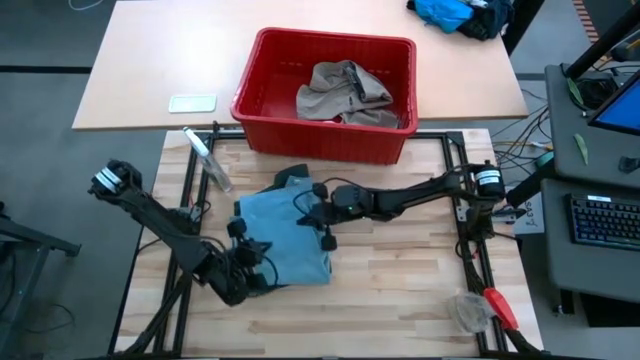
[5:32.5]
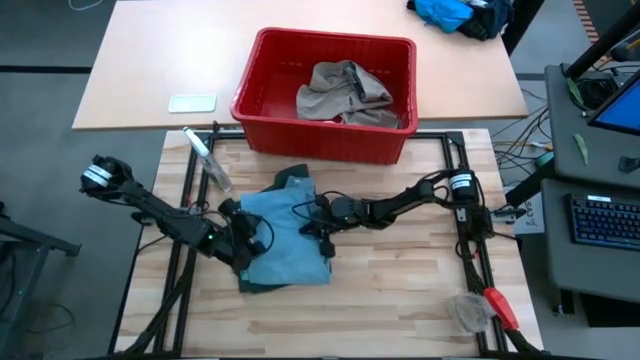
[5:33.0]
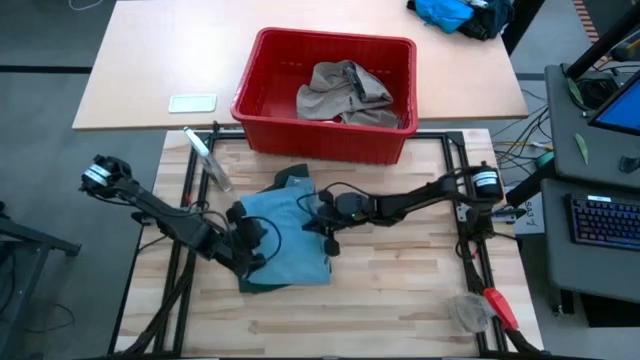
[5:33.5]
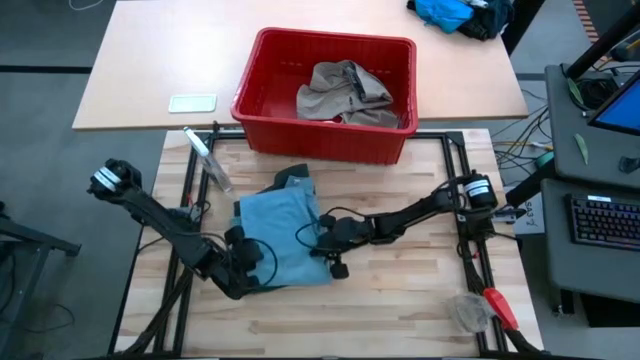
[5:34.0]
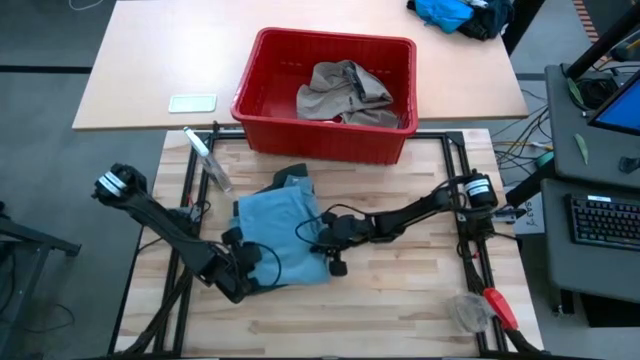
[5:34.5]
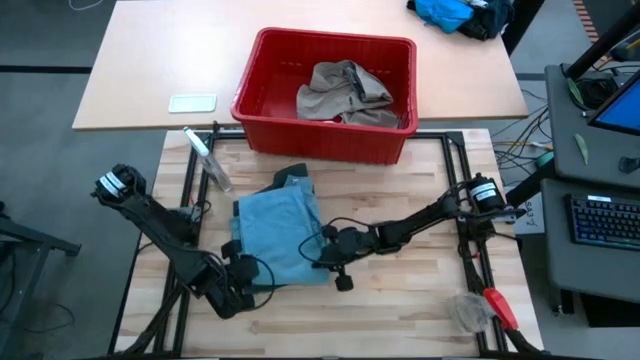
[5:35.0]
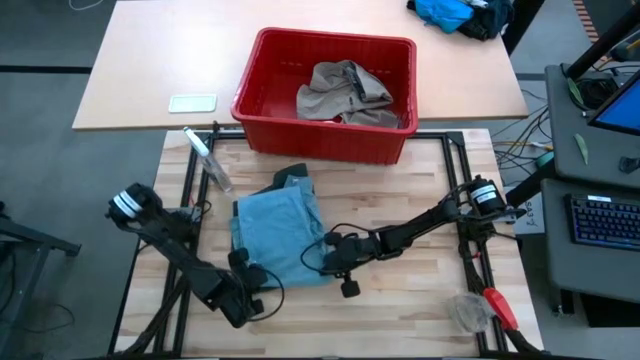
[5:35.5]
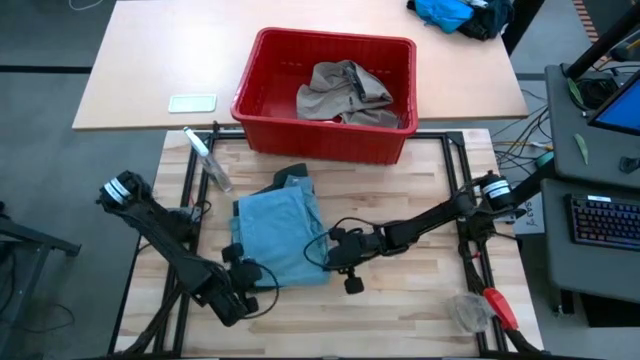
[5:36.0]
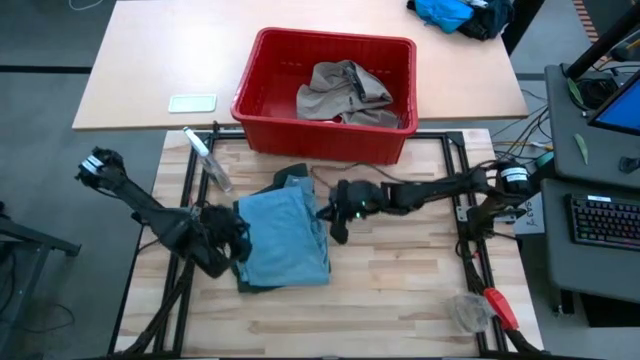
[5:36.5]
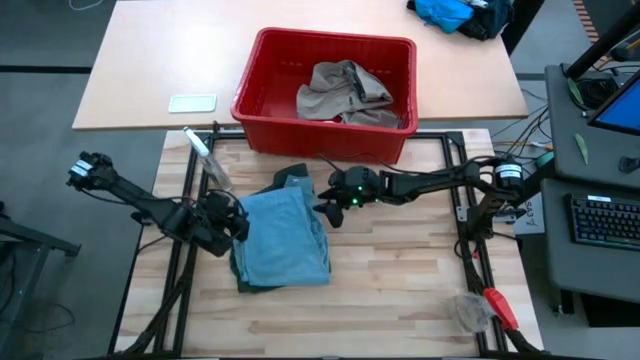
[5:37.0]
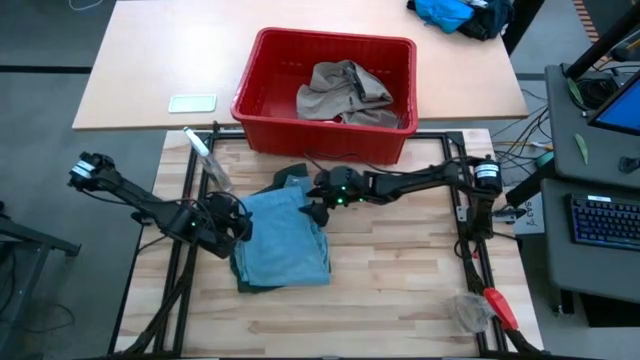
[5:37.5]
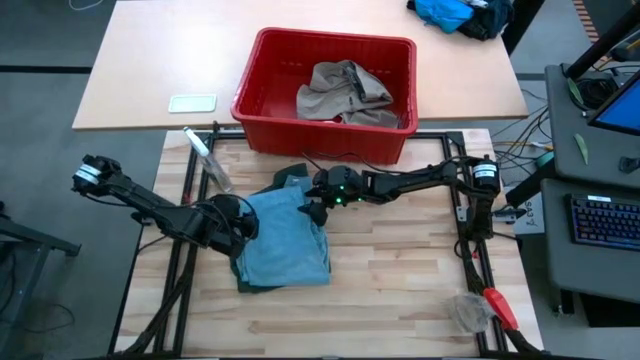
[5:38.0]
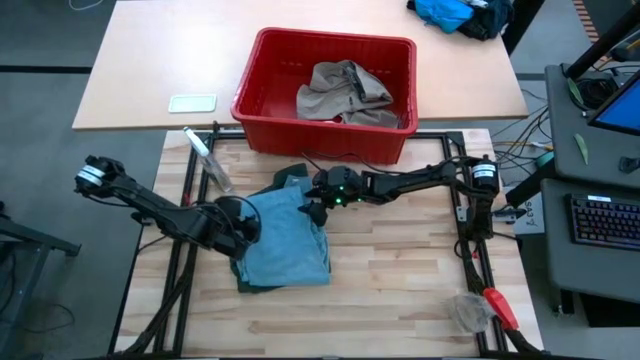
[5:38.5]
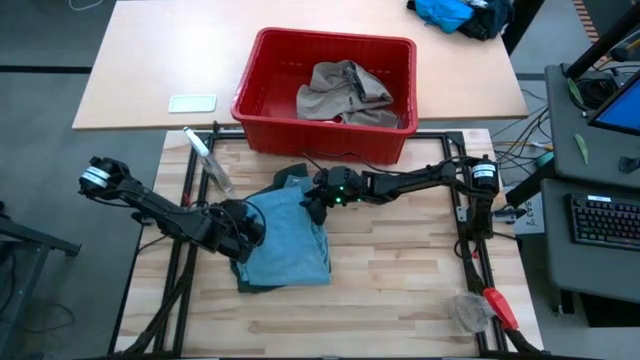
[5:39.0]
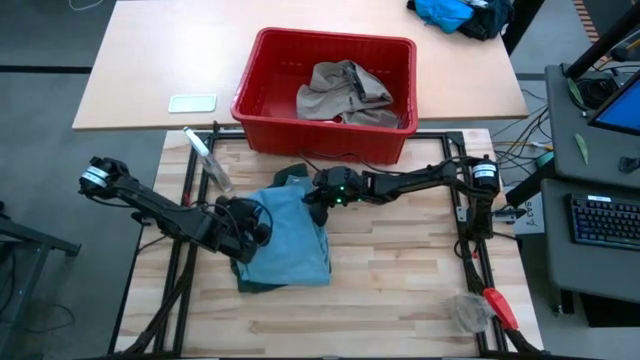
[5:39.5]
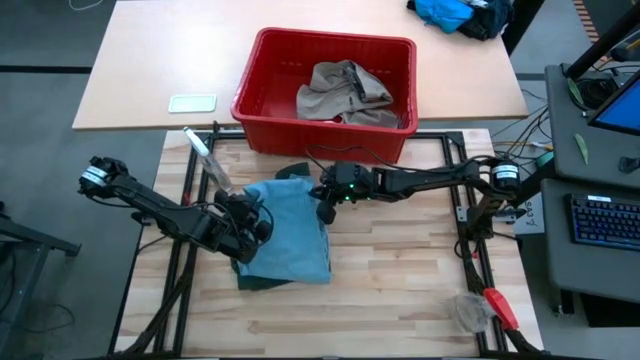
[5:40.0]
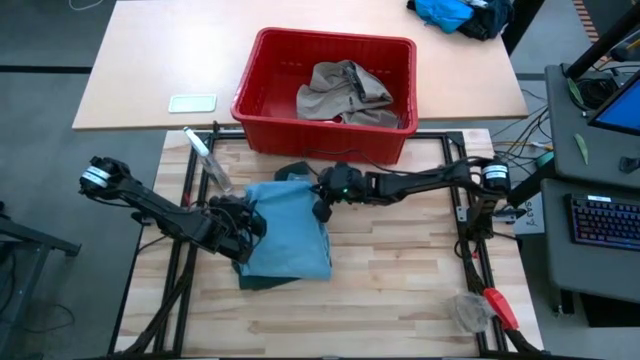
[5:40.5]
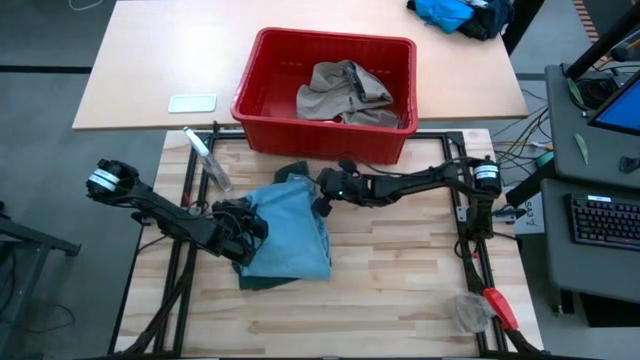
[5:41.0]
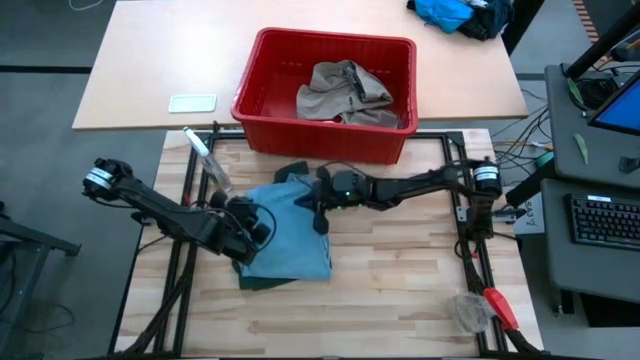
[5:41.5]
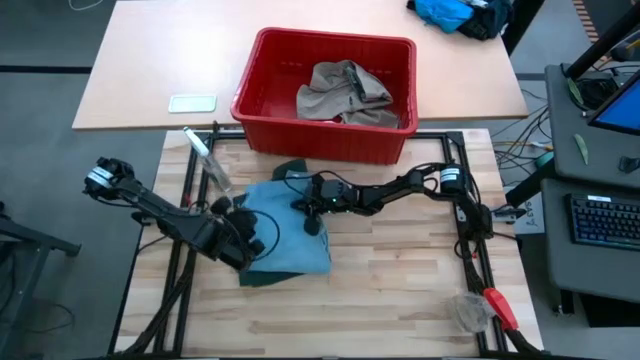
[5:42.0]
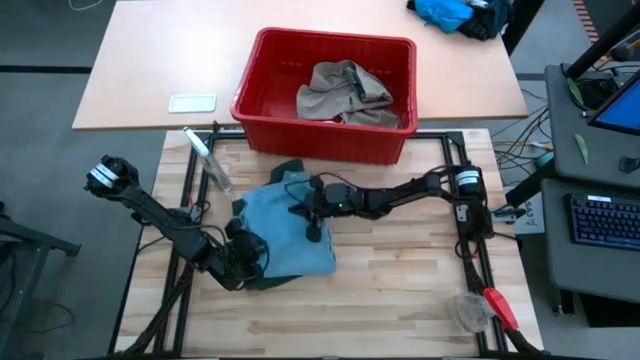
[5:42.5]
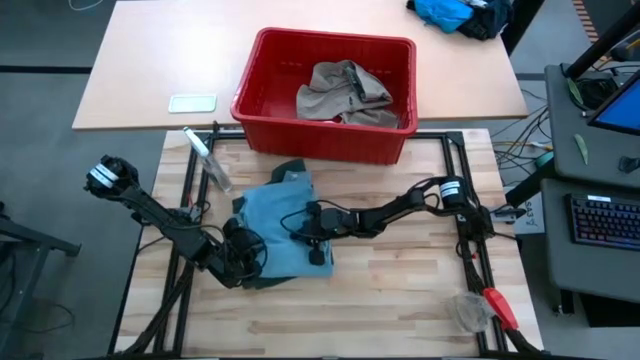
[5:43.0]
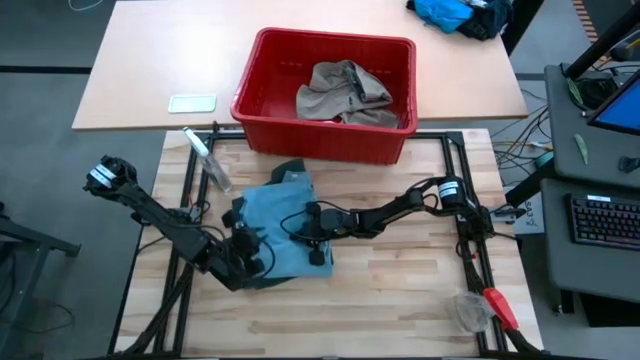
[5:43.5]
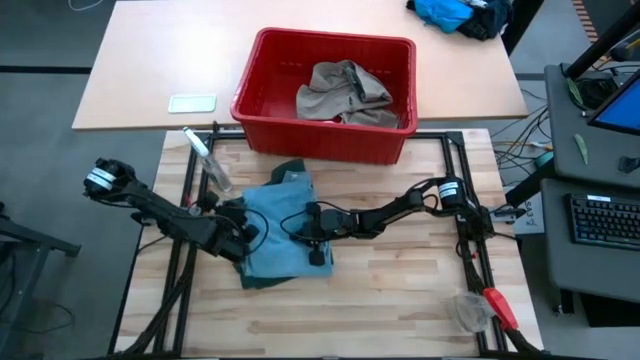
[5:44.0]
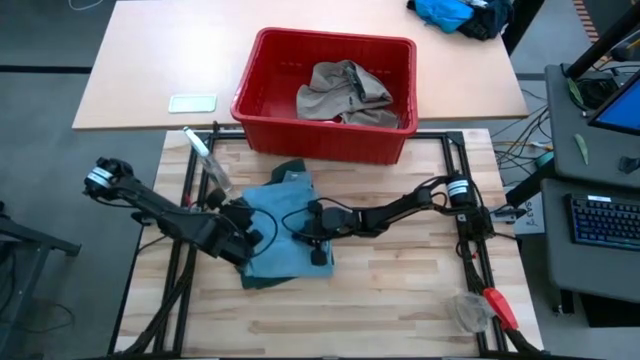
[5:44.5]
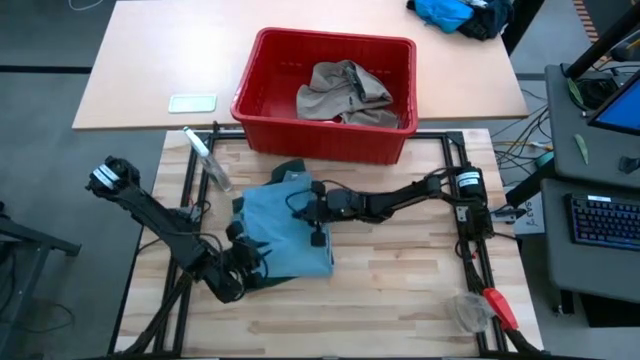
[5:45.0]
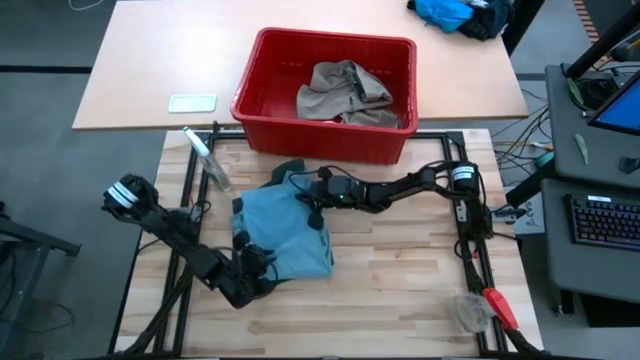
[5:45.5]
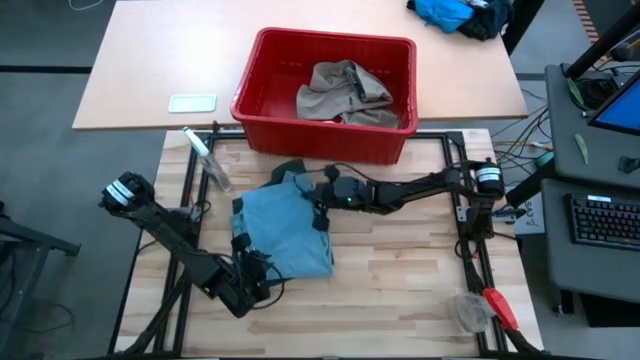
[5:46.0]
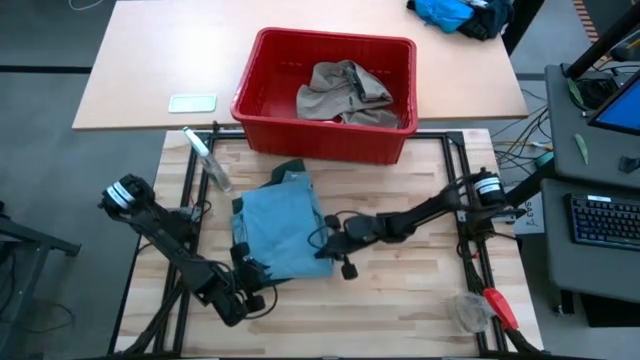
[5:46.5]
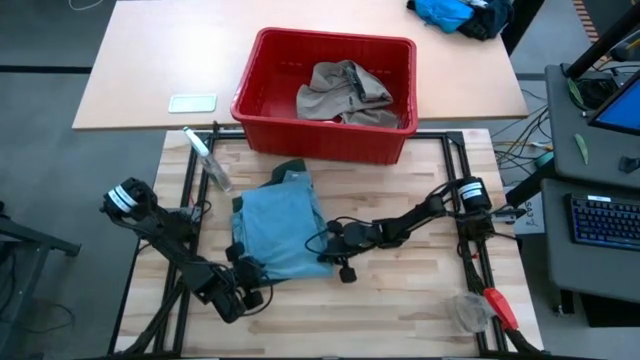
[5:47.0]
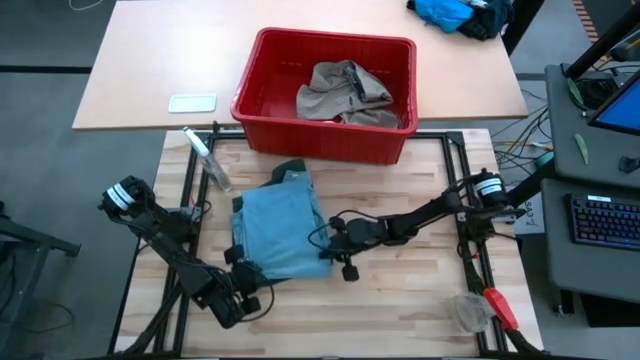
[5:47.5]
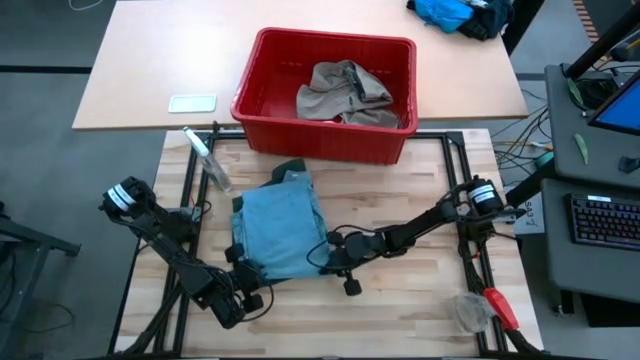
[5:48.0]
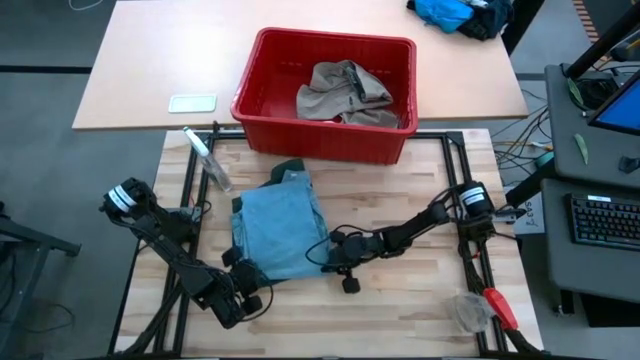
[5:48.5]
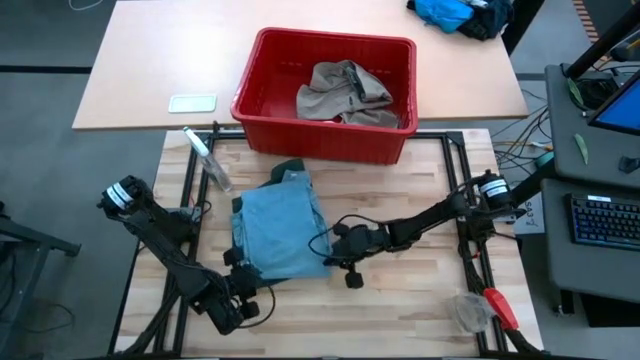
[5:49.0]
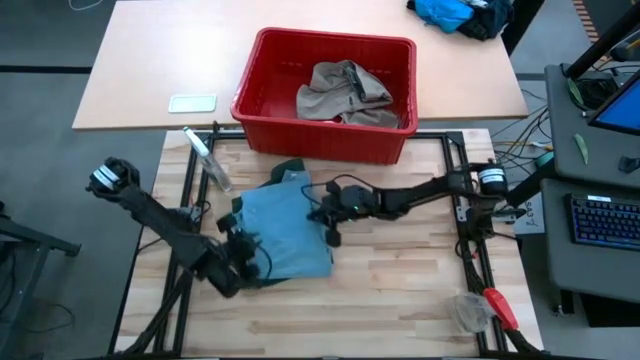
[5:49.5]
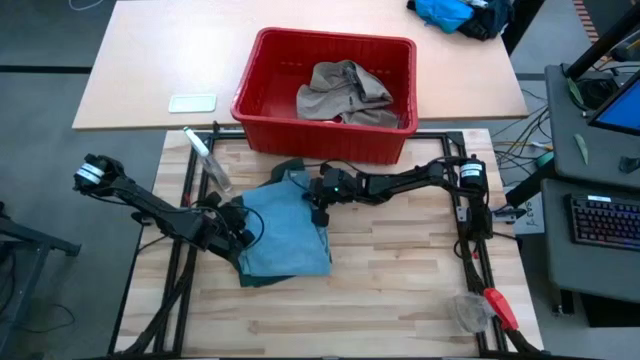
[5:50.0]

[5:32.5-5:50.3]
Task: Fold Laundry from Bin
Stack the blue jeans on top of the green polo shirt

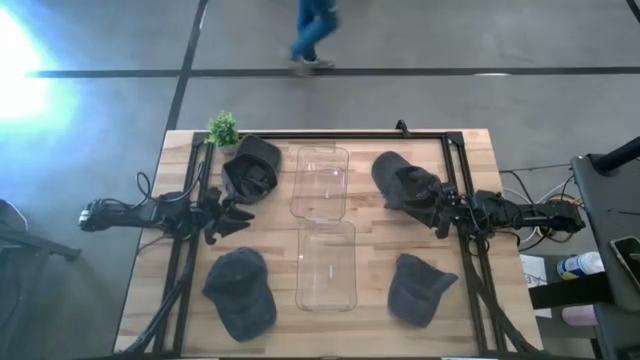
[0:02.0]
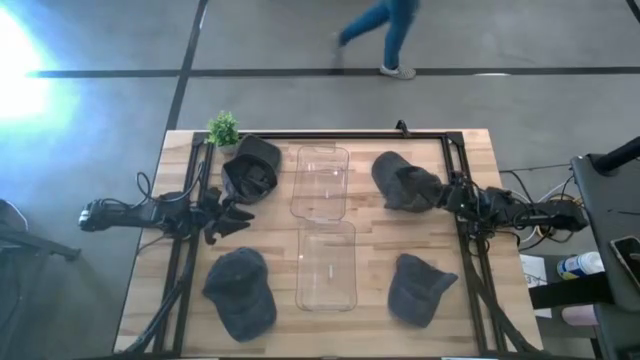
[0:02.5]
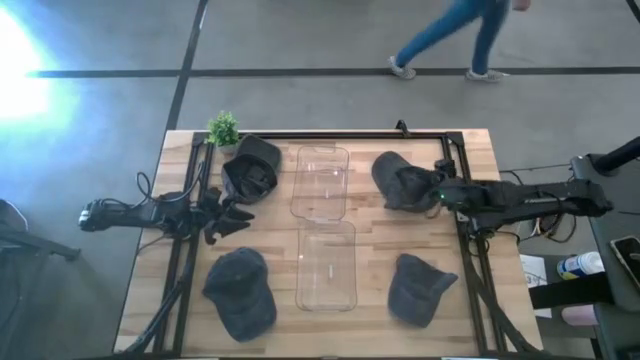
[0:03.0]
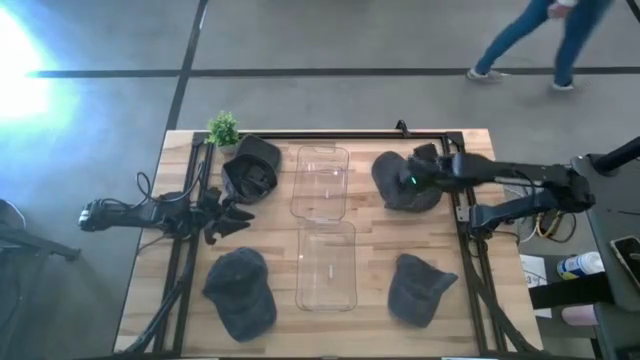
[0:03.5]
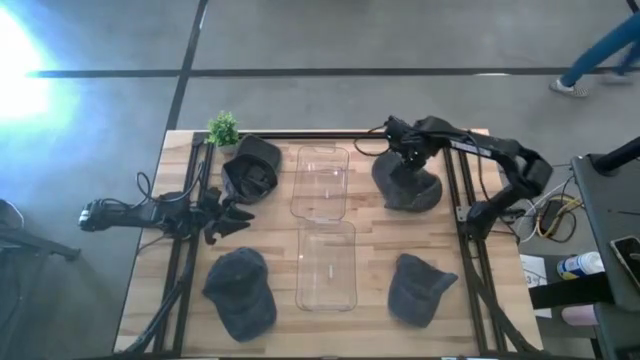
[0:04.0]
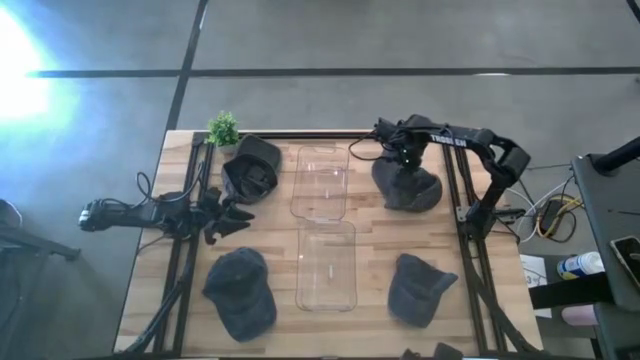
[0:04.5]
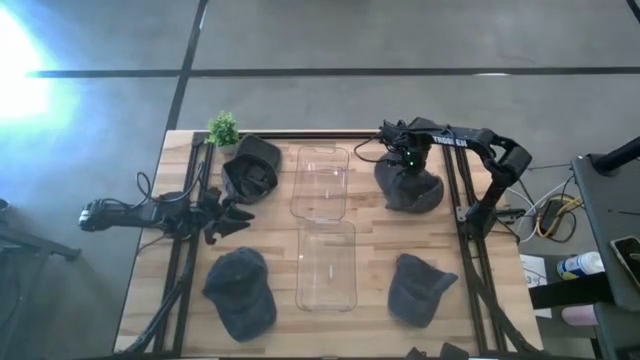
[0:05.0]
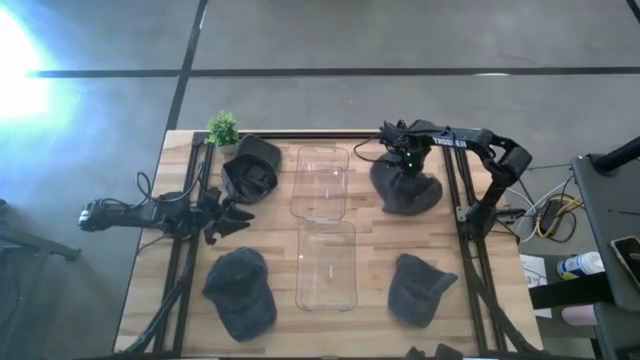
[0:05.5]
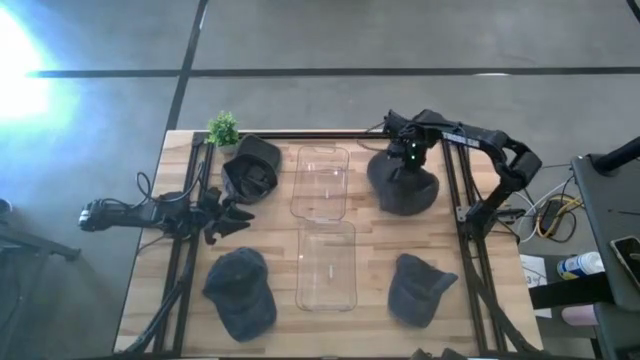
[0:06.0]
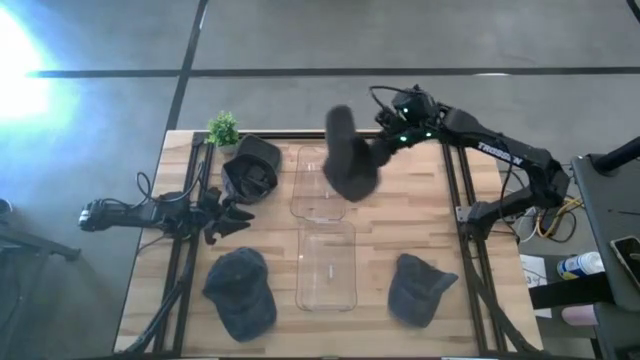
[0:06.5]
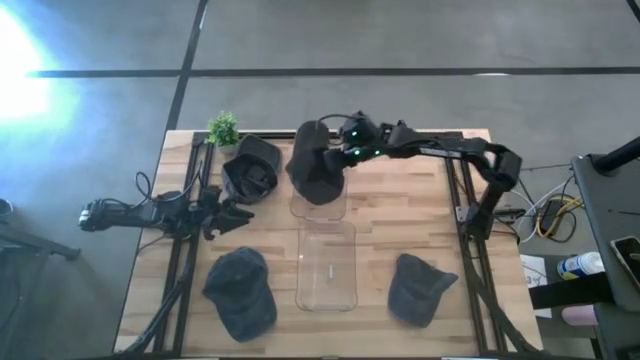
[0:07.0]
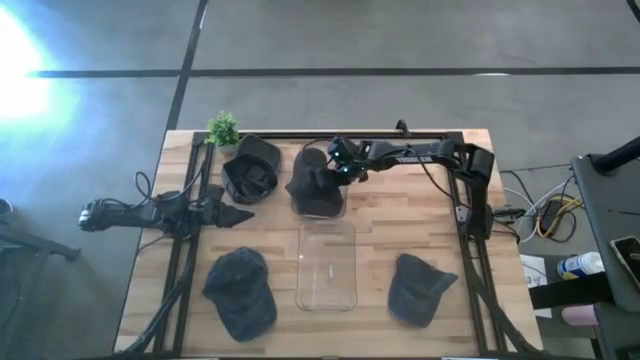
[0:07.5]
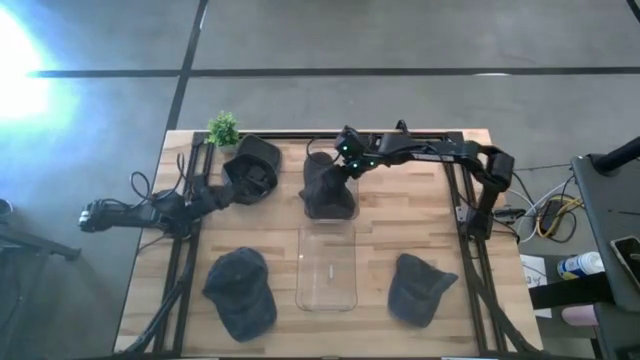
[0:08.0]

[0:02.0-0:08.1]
Task: Pick & Place hat
Put the right gray cap into the top transparent bin
